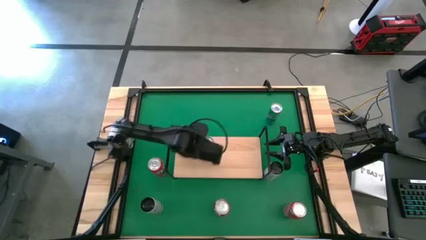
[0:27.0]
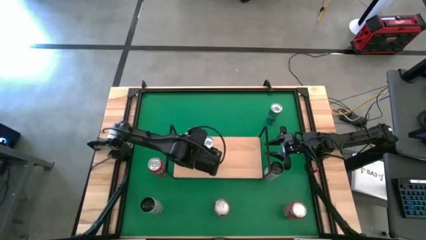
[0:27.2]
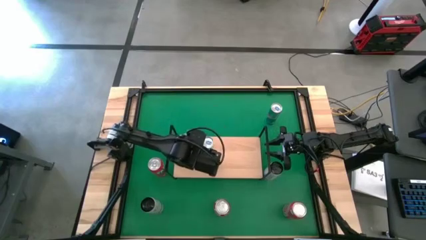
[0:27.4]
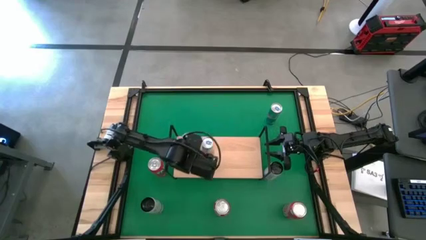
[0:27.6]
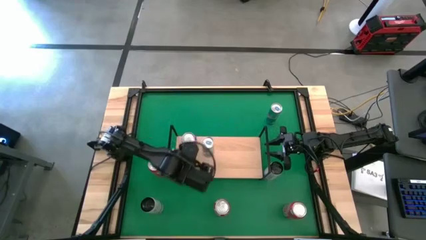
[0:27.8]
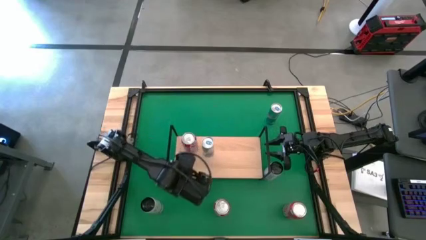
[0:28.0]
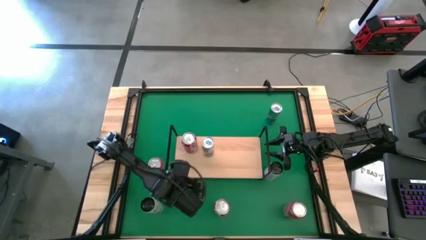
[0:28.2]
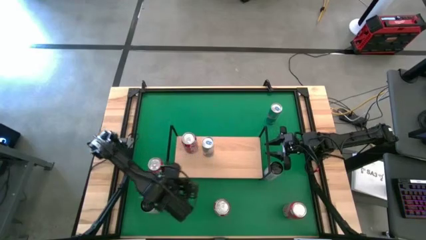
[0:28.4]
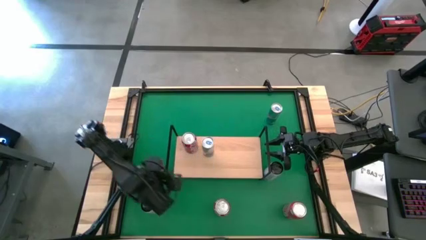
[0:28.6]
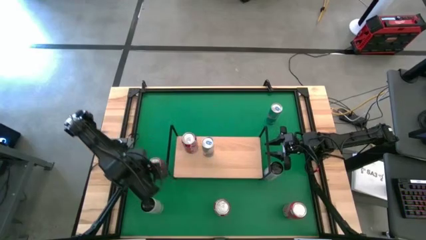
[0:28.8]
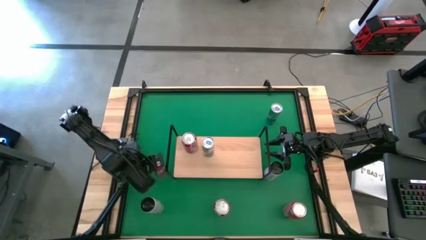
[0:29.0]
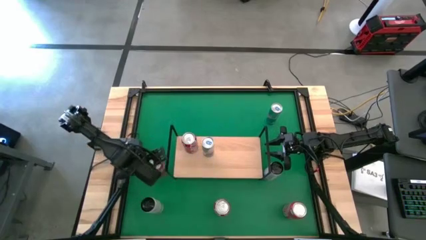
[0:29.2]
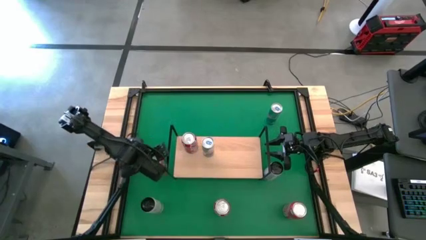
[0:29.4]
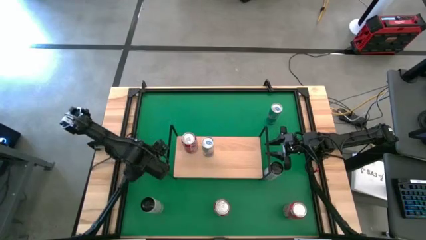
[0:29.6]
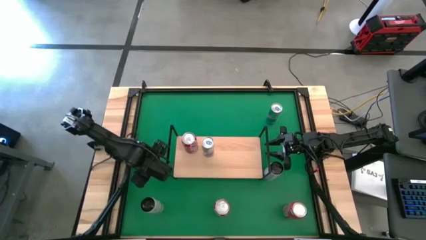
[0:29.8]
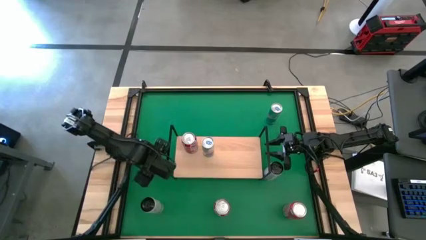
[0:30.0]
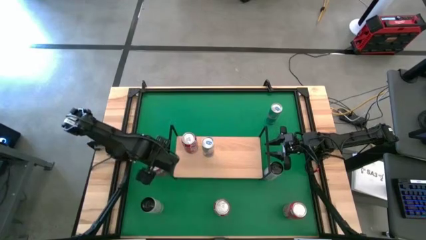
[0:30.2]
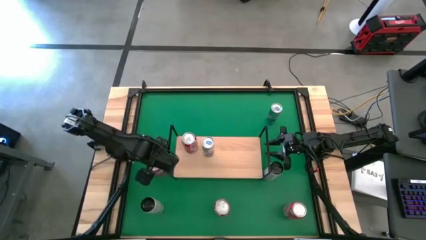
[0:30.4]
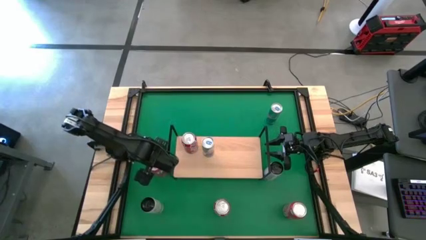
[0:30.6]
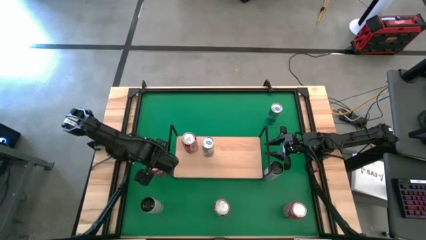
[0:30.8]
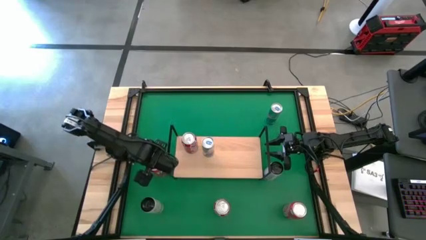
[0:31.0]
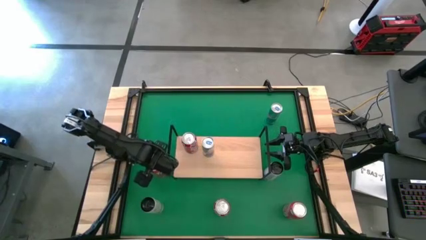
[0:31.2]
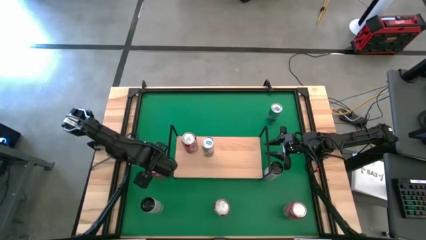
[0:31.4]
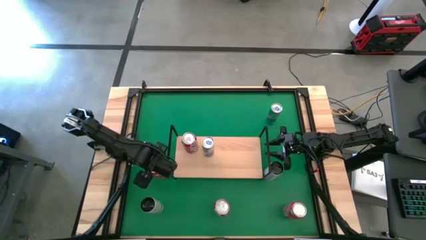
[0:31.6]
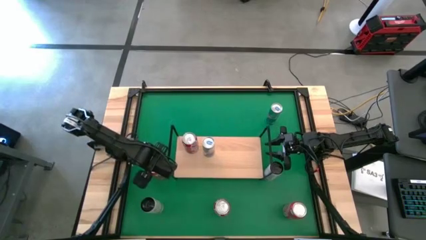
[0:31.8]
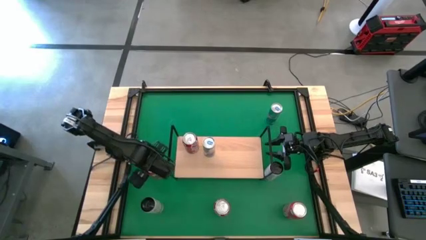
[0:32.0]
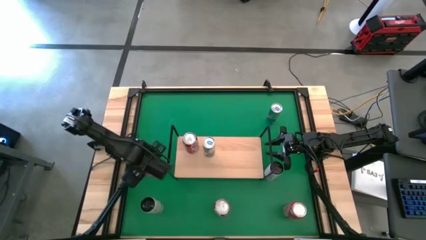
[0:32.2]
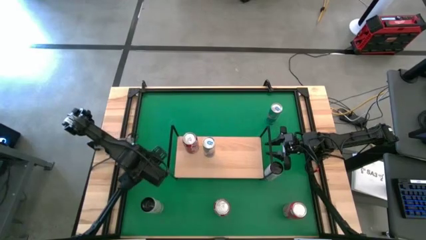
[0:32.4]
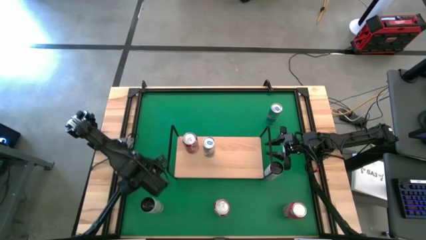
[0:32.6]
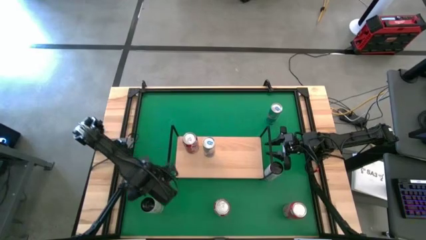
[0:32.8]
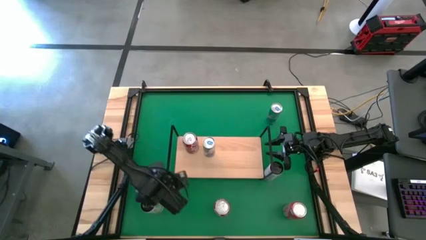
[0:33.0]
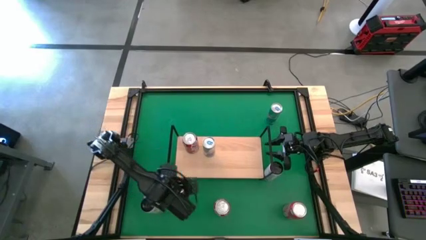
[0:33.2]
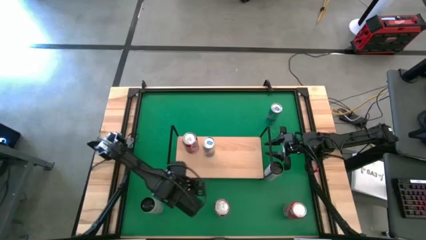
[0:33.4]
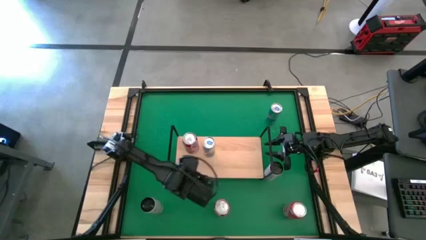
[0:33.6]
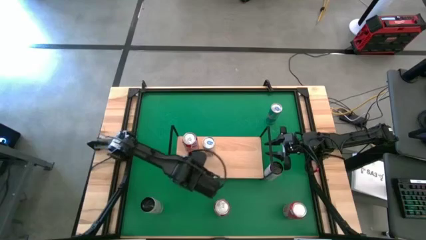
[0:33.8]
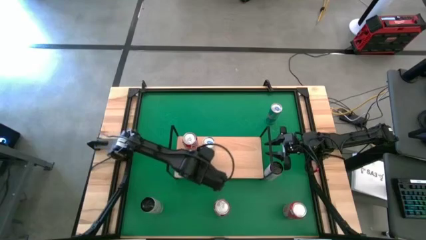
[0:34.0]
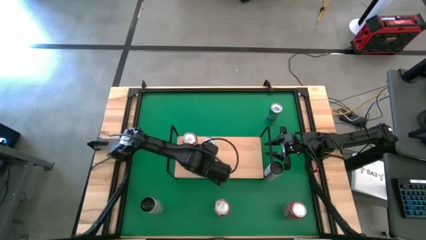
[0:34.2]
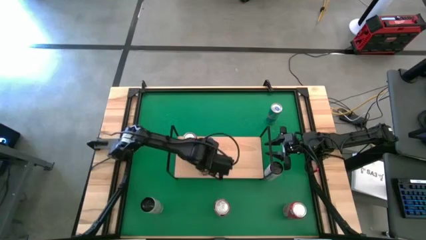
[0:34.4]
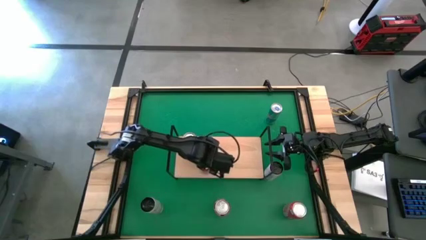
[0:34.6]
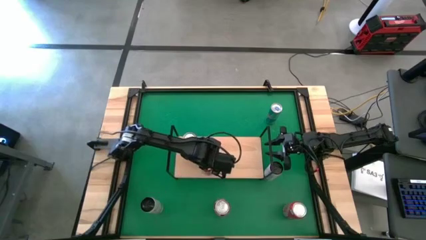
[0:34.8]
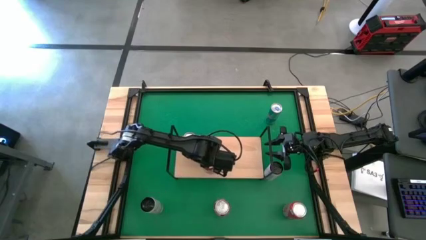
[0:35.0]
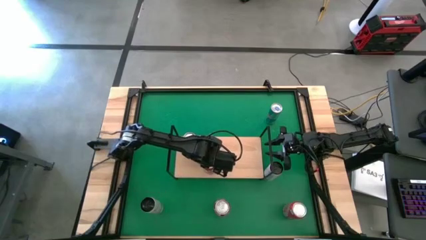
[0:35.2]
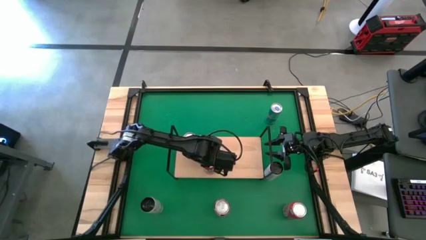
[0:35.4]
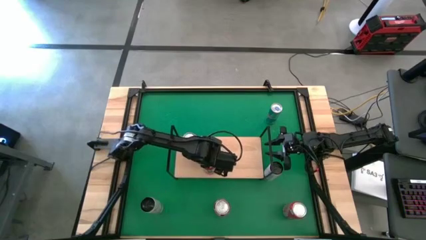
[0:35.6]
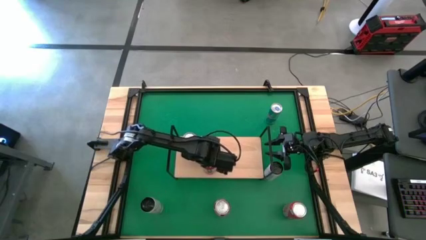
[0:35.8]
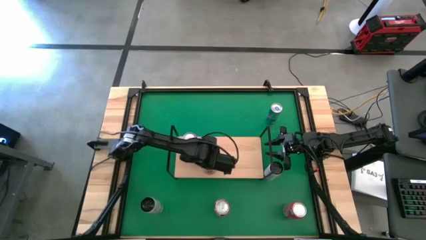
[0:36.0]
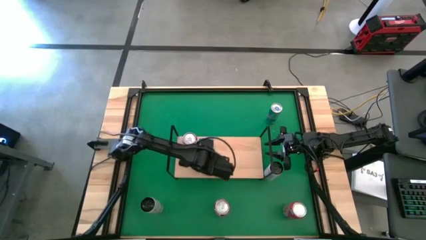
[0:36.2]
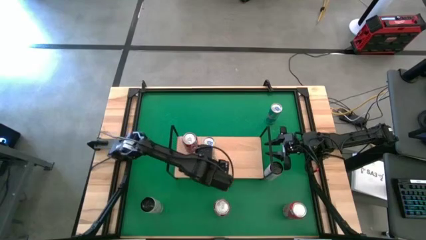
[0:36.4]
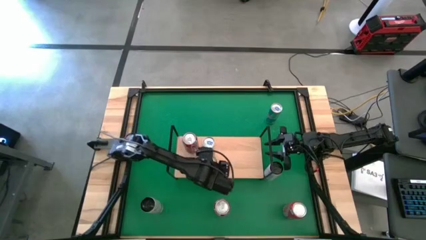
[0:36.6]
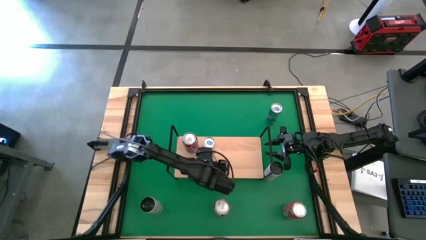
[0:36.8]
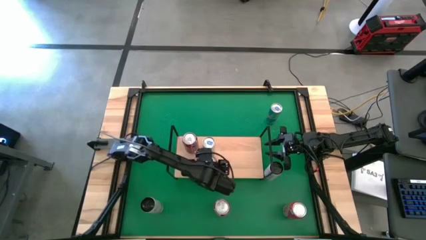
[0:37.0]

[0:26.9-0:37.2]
Task: Place canned beverage on shelf
Put the top orange soda can on the shelf

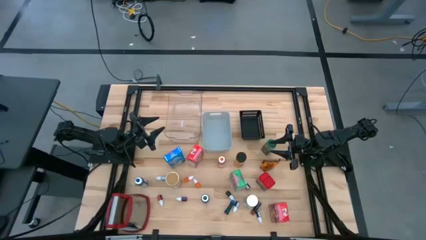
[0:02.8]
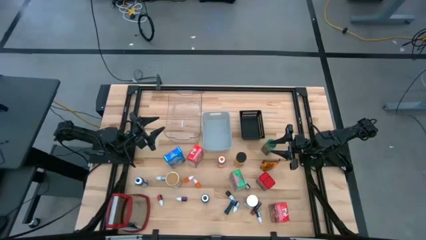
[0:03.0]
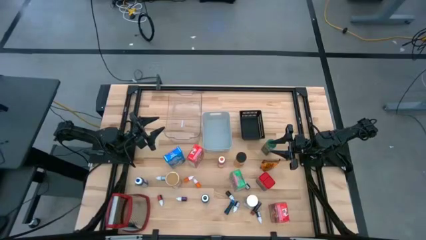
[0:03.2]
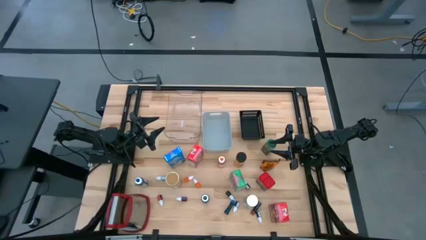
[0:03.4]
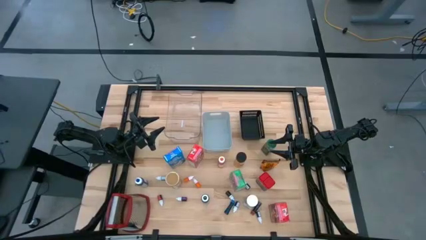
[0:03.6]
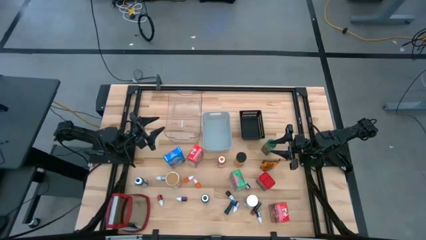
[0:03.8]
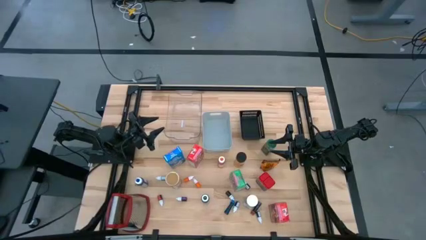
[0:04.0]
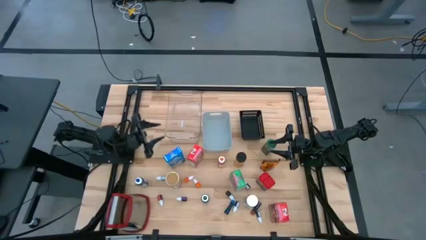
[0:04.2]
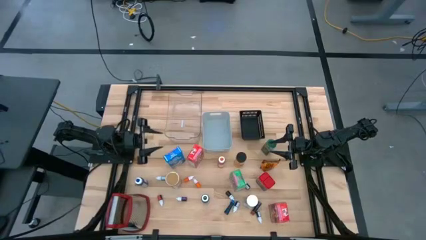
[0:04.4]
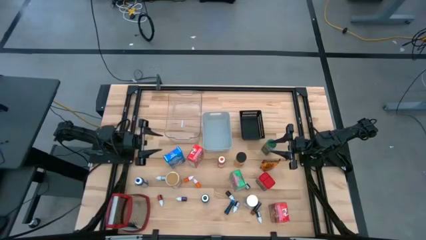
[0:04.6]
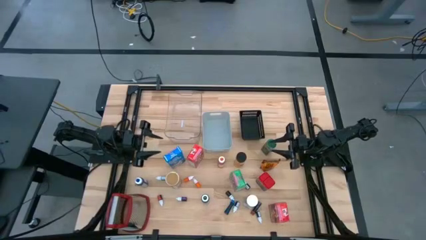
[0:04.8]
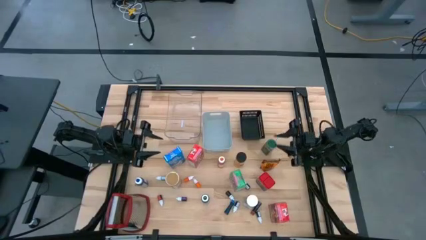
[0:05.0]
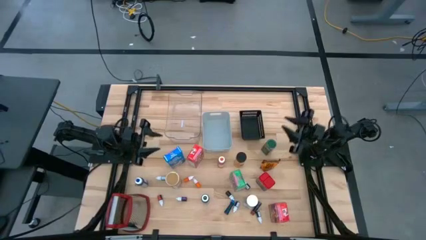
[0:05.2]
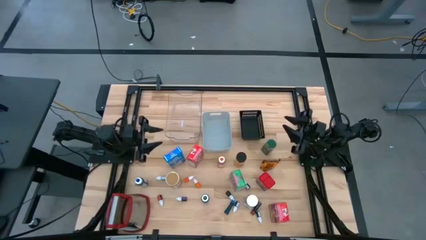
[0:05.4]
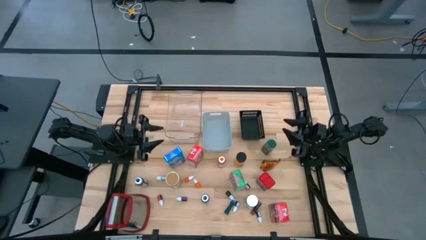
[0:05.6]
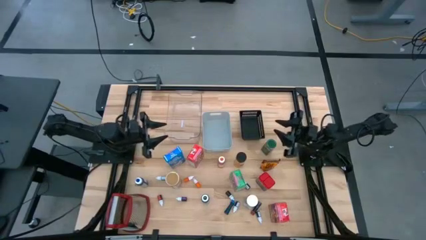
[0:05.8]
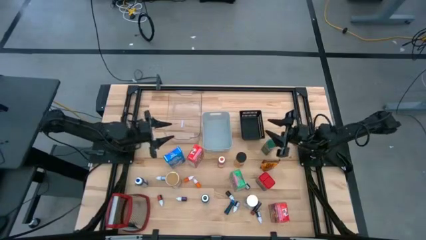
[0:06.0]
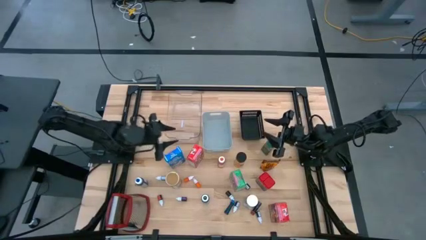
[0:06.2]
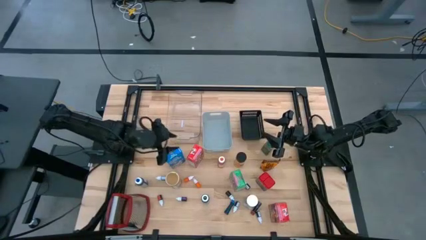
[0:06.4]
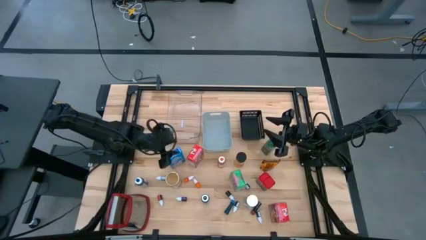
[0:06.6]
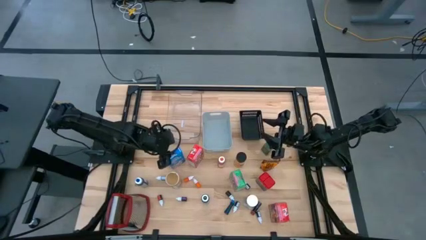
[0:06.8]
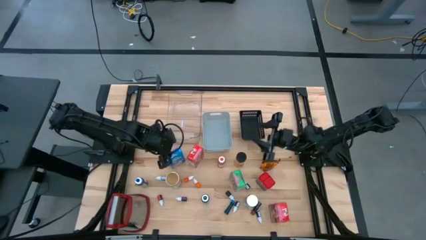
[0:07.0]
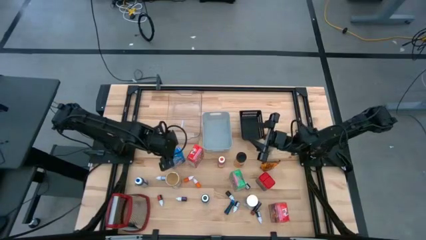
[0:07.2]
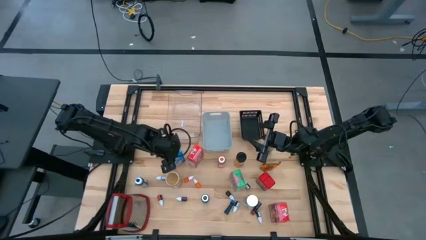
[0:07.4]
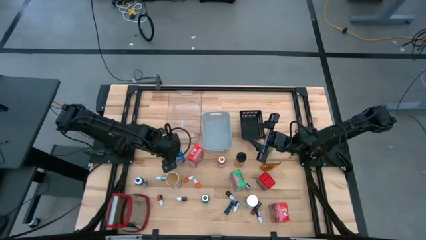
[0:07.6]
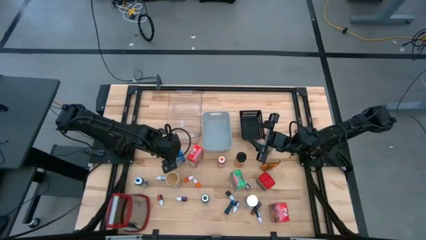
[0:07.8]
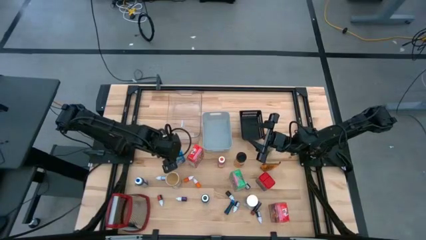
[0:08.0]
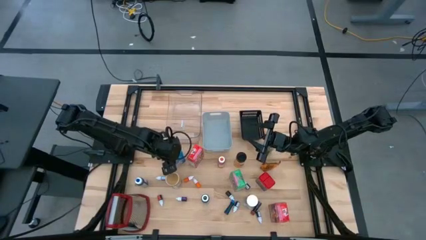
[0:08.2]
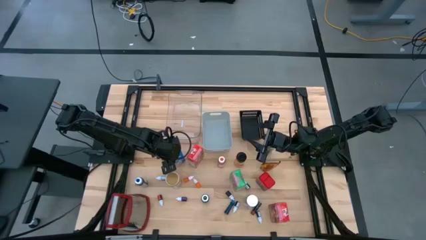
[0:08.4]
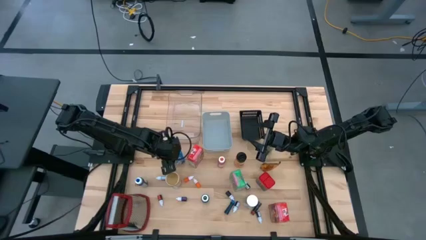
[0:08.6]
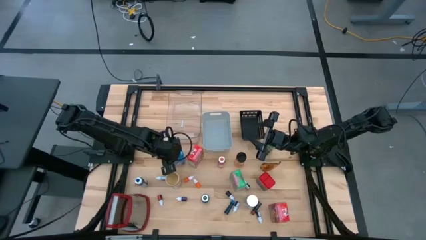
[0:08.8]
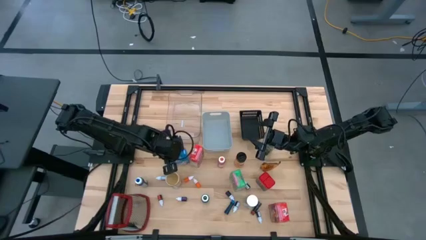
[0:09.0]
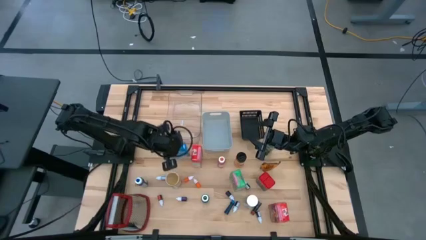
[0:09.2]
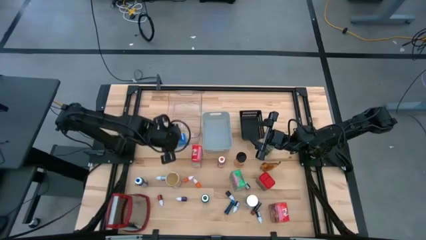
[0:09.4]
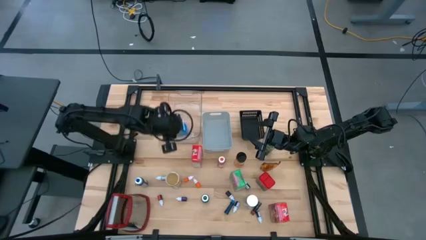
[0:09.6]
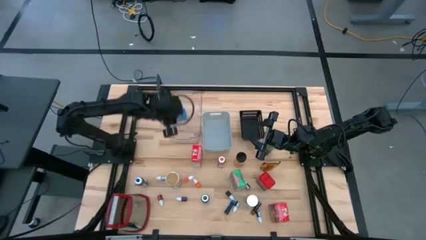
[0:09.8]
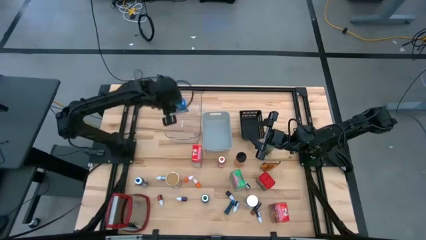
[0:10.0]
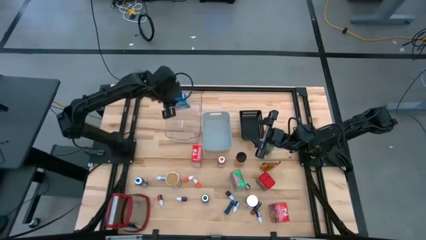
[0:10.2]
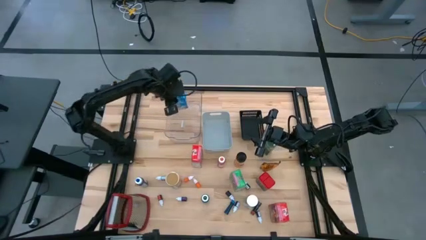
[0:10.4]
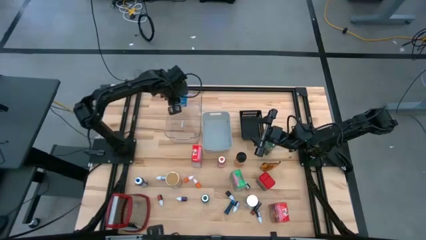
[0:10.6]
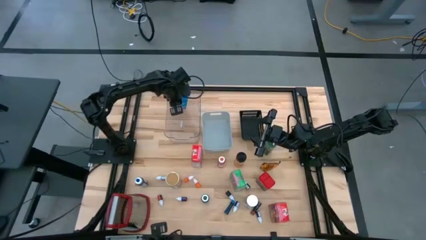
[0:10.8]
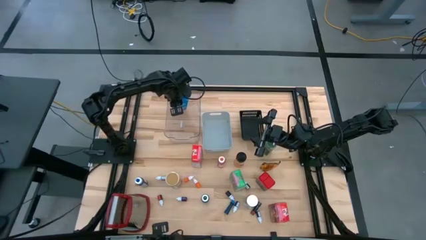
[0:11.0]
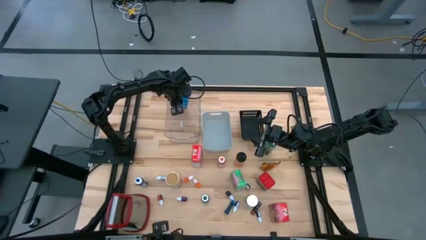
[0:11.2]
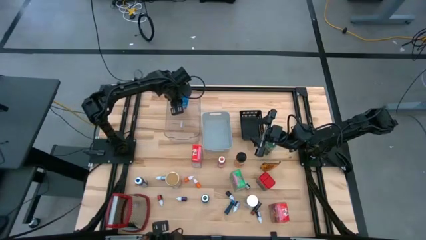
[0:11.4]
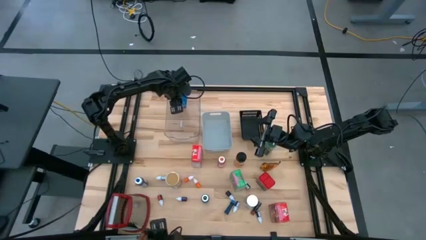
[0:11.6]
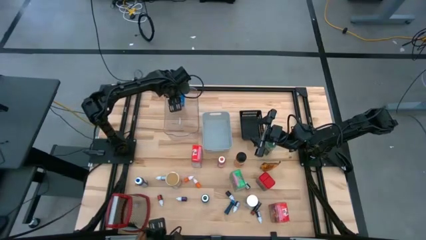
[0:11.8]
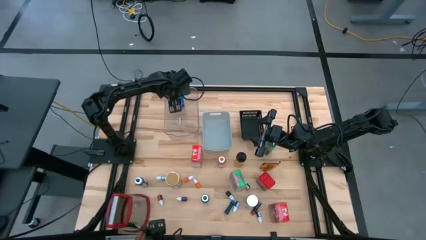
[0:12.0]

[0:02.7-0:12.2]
Task: Pick & Place Kitchen Items
Put the blue cereal box into the transparent bin
